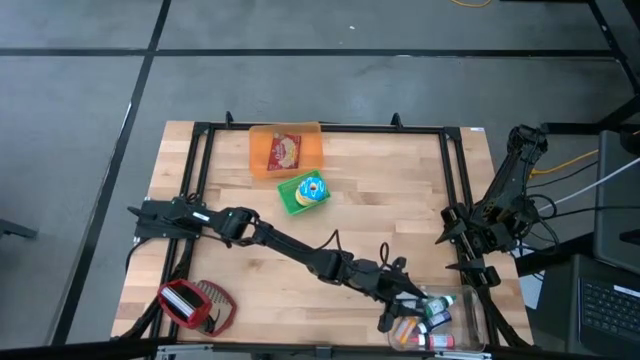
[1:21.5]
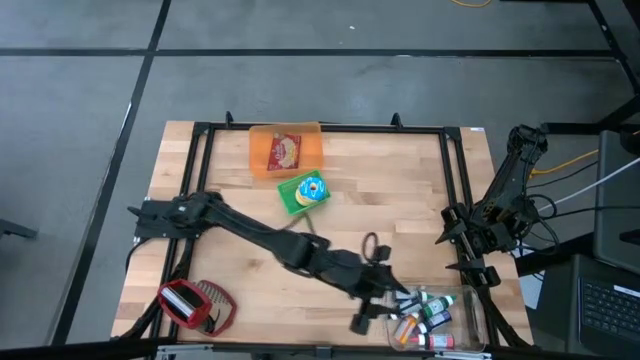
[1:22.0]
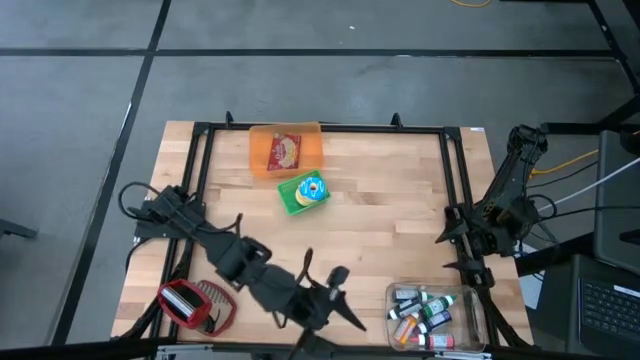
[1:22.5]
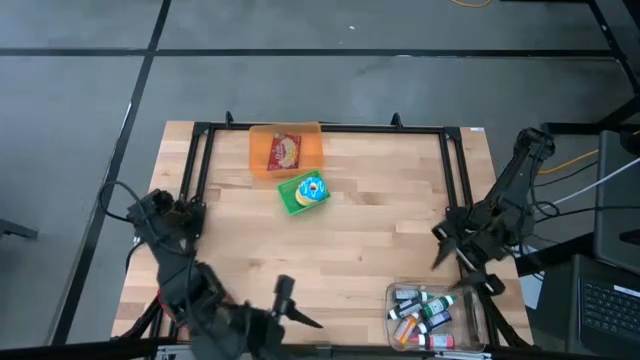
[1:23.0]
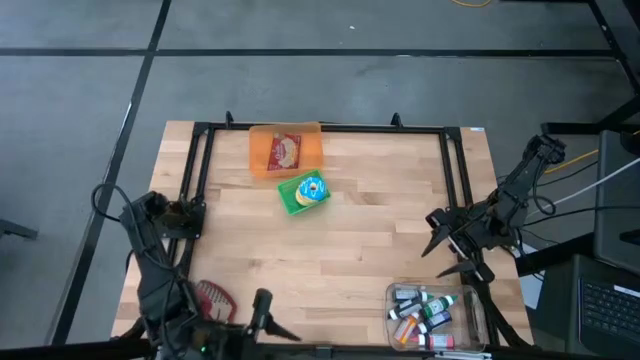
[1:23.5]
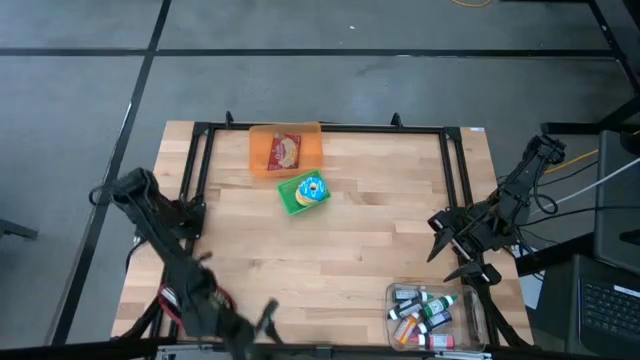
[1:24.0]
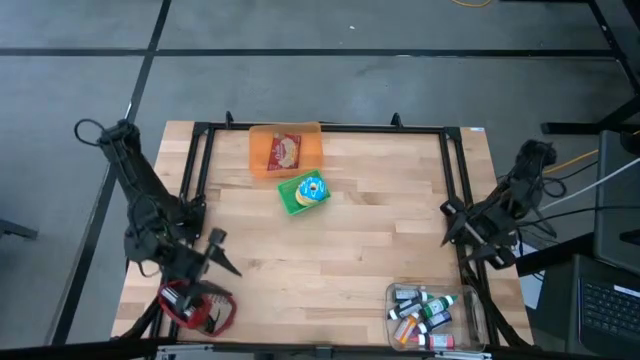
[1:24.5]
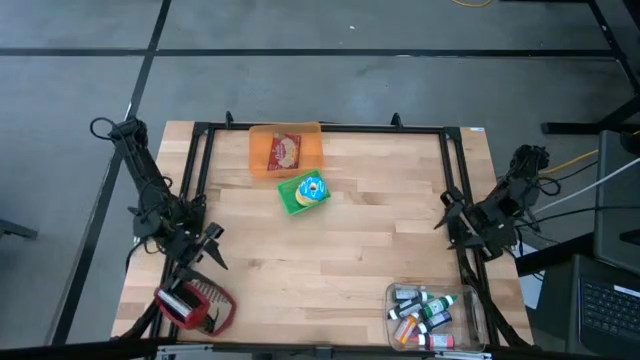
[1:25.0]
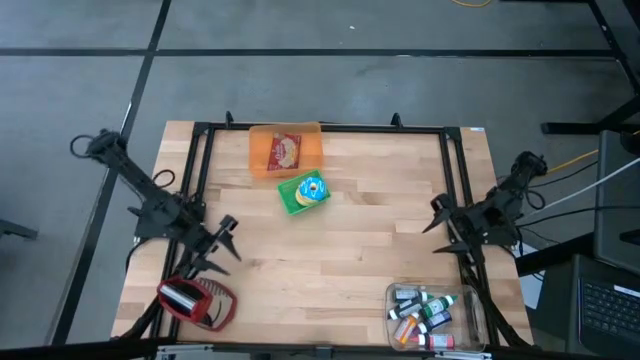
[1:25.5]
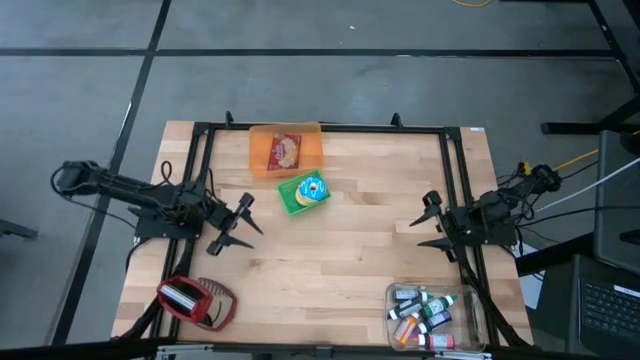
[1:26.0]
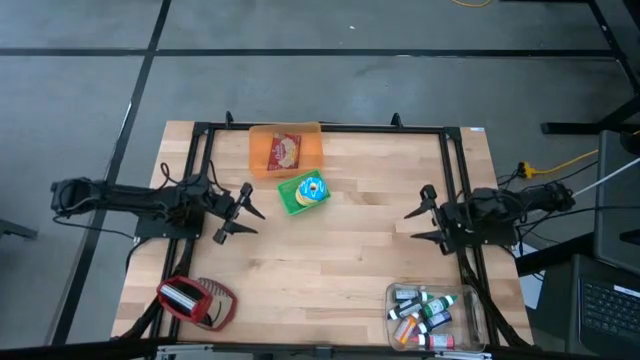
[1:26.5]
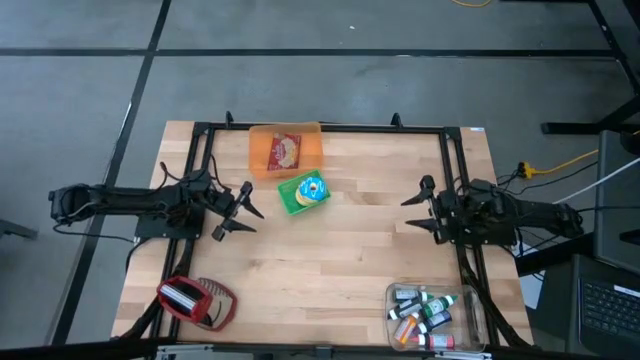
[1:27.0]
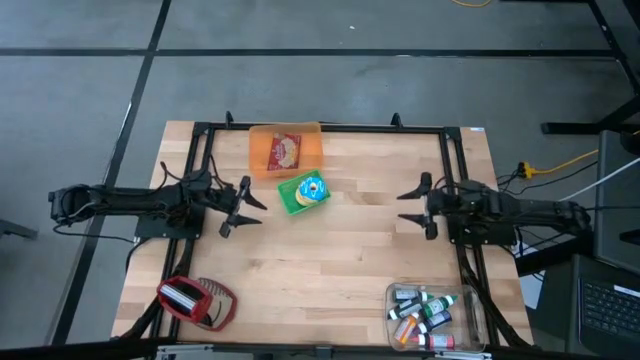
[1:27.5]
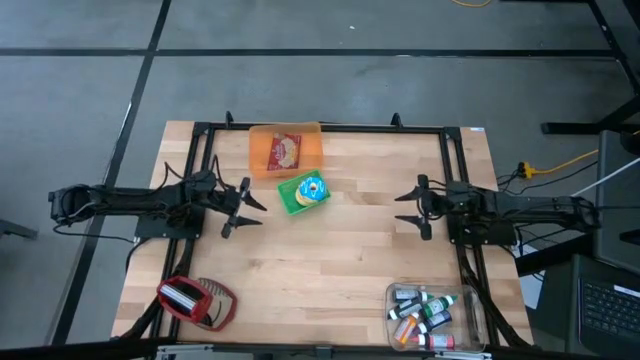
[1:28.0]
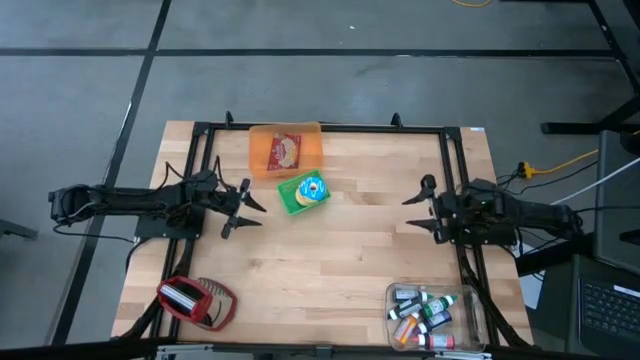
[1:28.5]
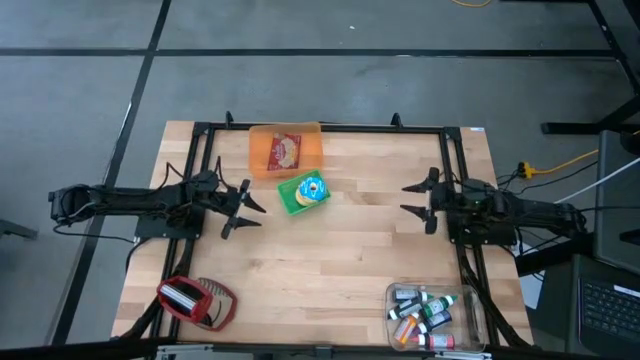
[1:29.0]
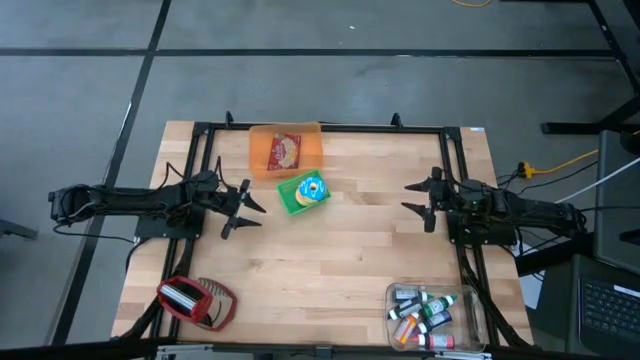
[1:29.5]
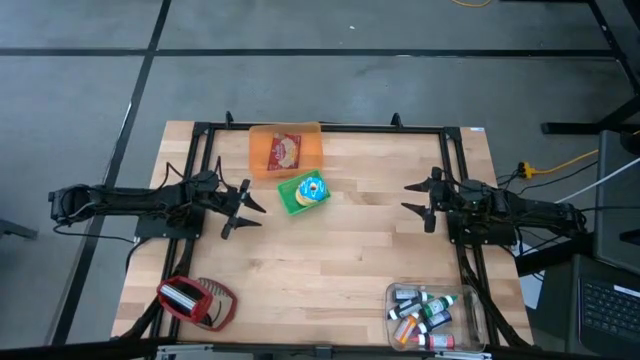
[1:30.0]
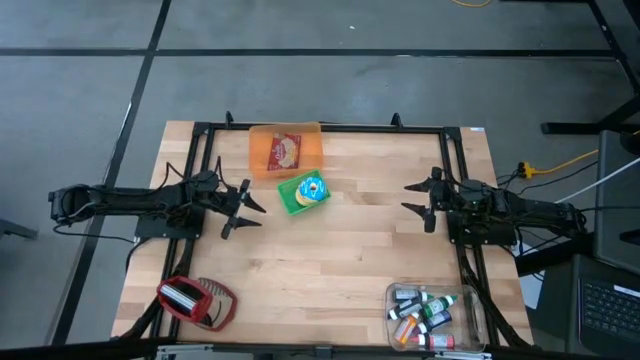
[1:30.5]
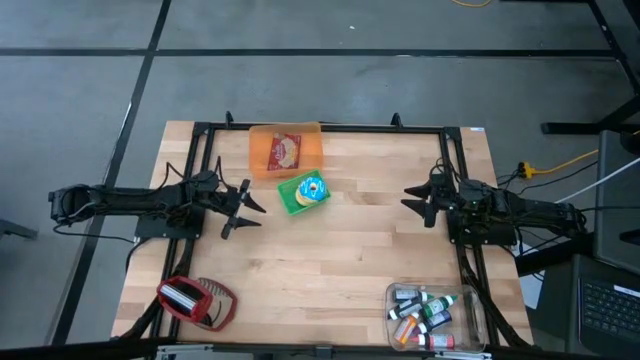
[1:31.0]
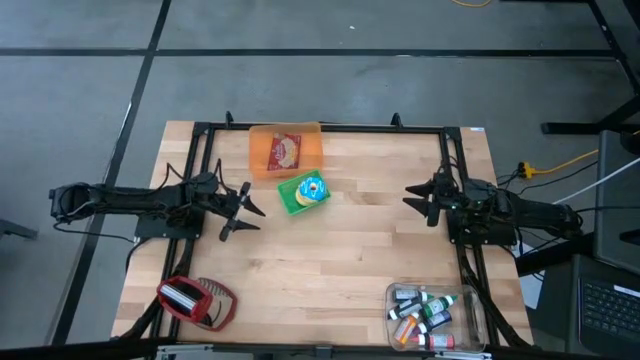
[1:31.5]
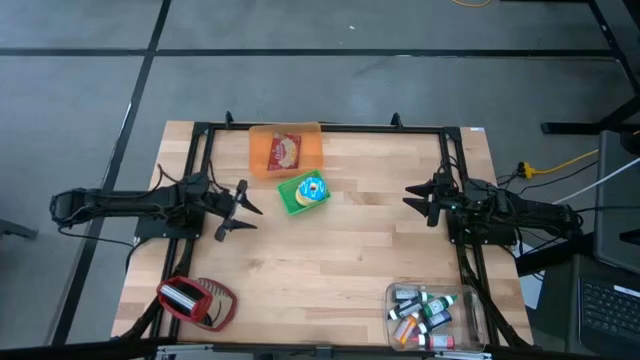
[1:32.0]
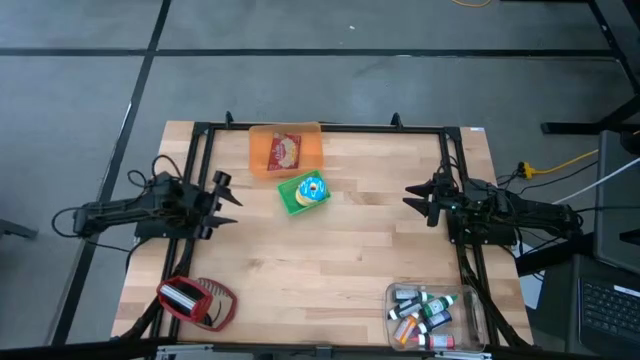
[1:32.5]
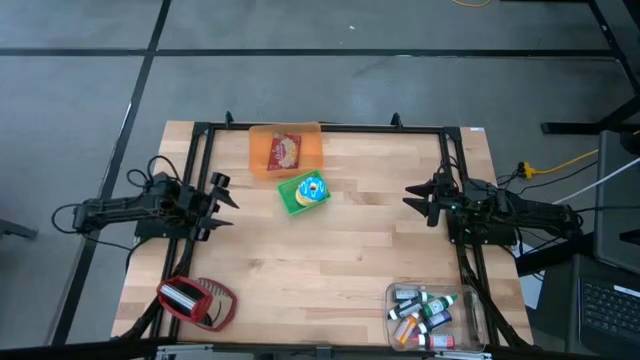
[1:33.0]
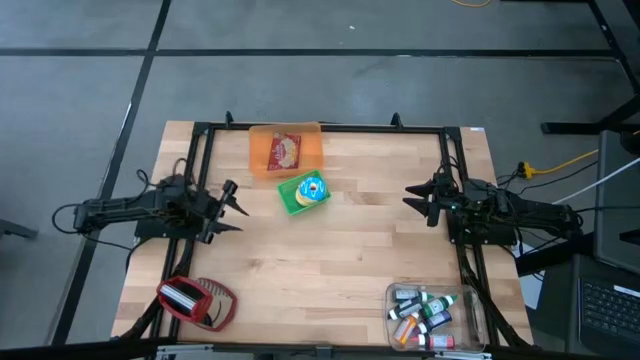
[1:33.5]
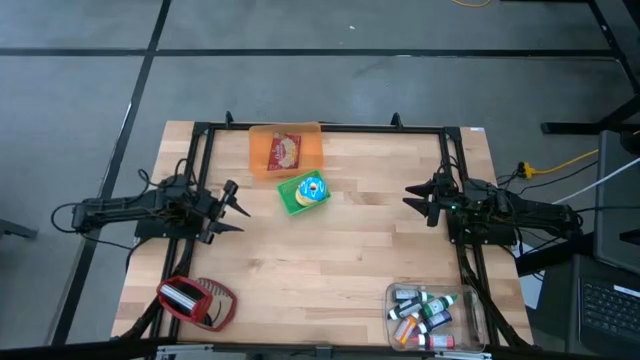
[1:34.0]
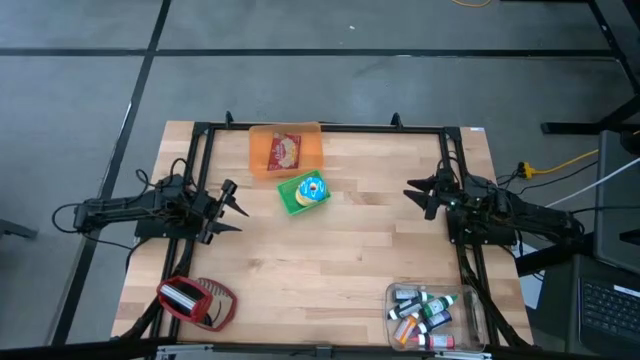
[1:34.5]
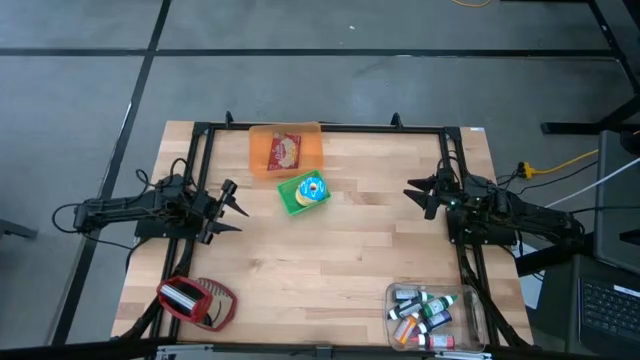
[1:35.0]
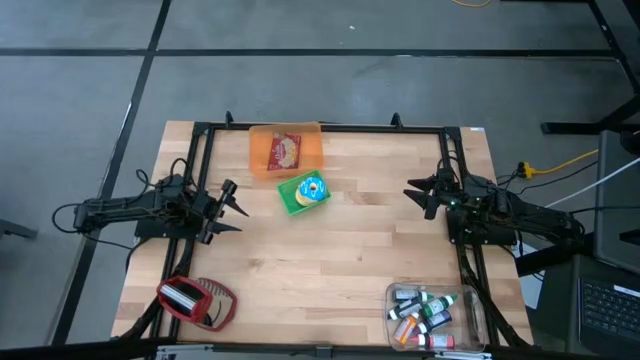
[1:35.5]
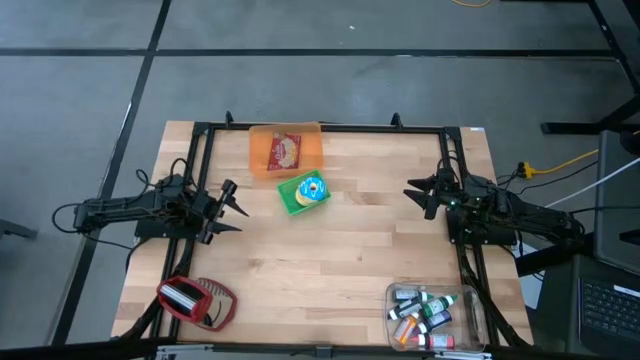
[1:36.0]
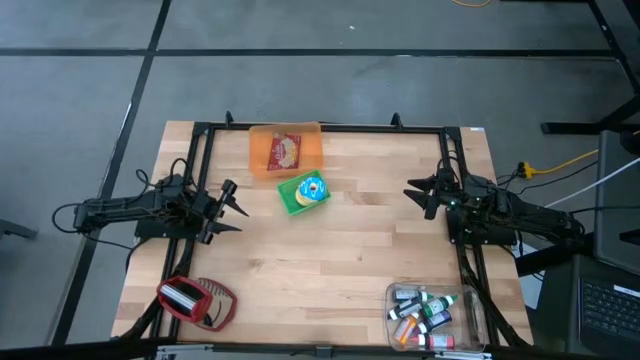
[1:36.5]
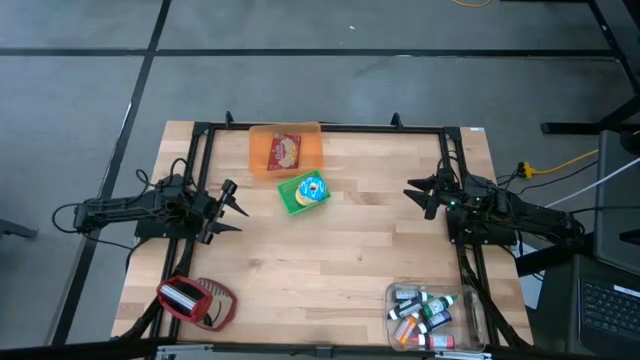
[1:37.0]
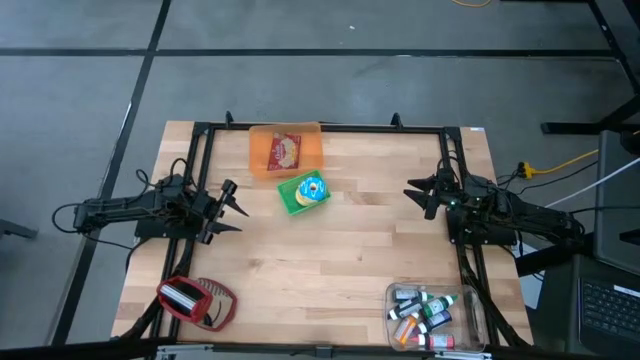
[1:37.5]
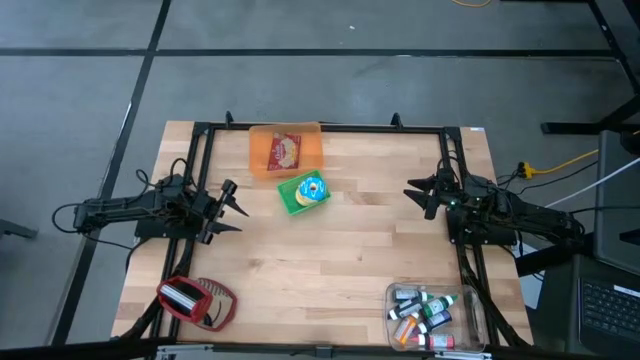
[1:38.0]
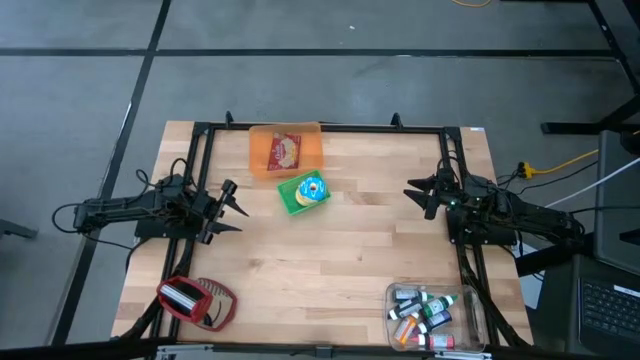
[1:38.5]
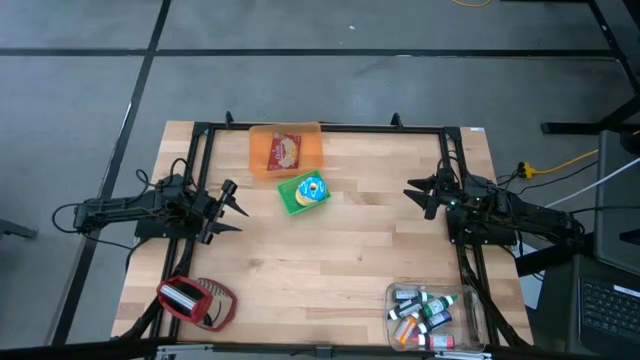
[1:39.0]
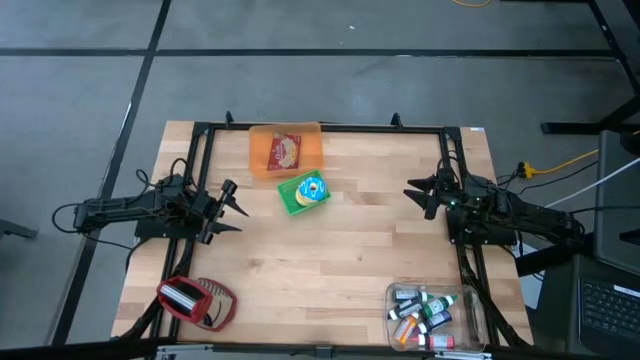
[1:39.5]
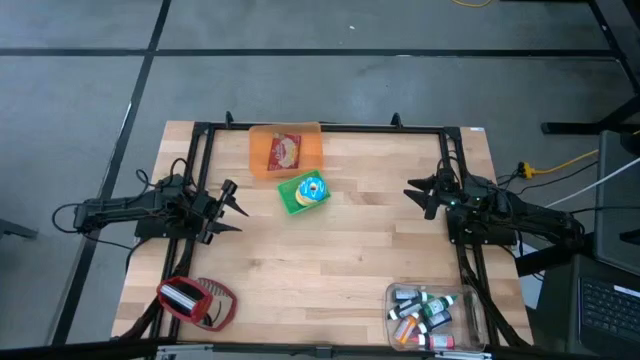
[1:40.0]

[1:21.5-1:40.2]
Return to Home Position
